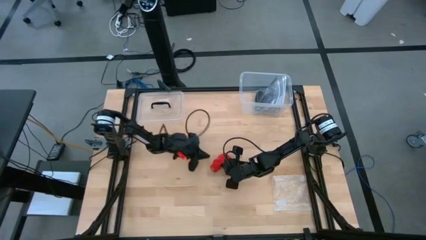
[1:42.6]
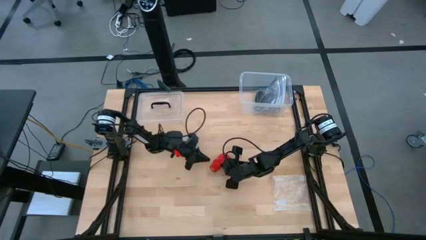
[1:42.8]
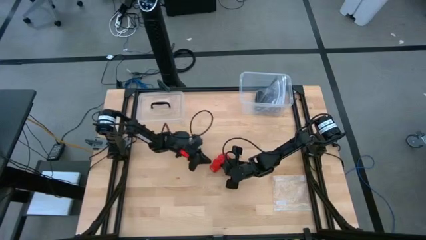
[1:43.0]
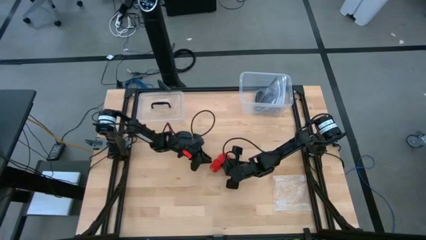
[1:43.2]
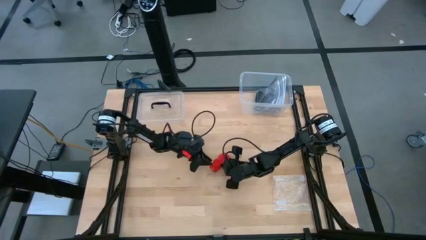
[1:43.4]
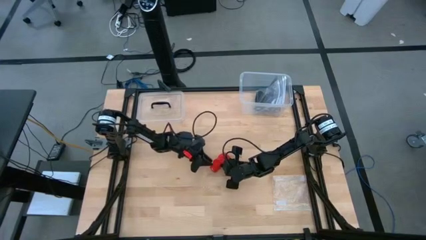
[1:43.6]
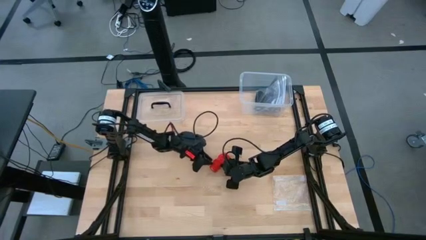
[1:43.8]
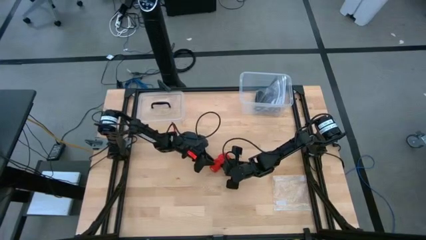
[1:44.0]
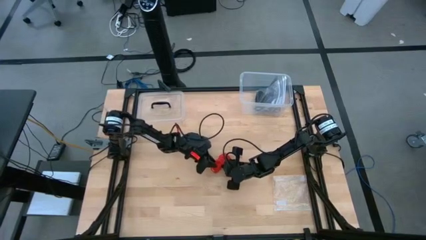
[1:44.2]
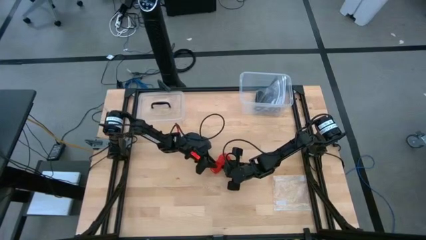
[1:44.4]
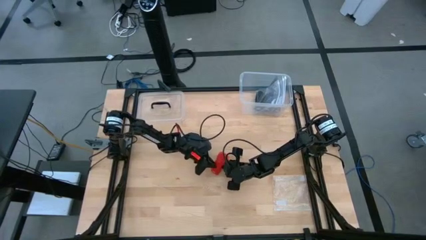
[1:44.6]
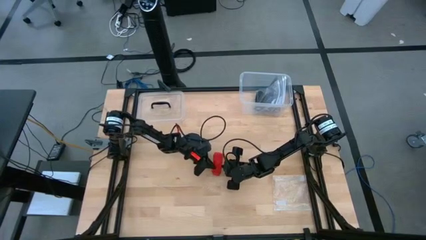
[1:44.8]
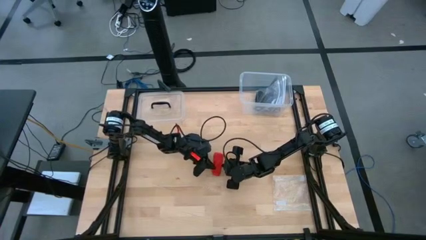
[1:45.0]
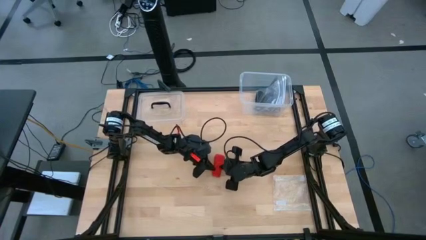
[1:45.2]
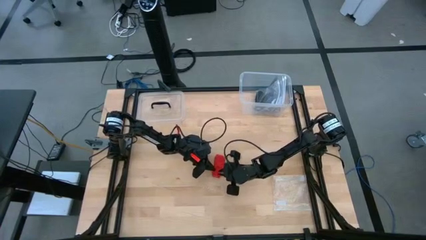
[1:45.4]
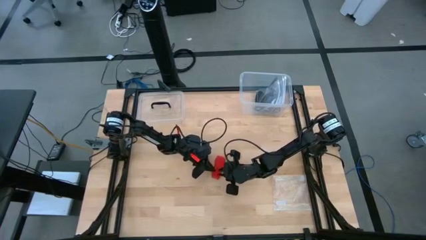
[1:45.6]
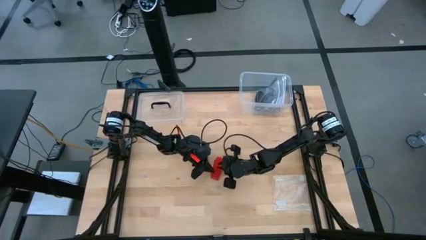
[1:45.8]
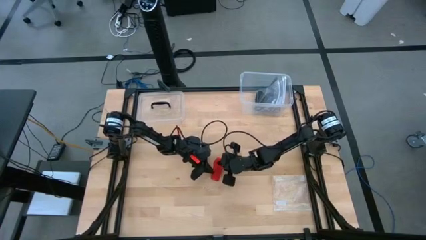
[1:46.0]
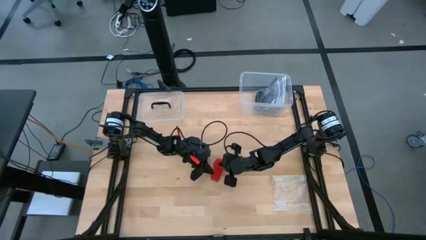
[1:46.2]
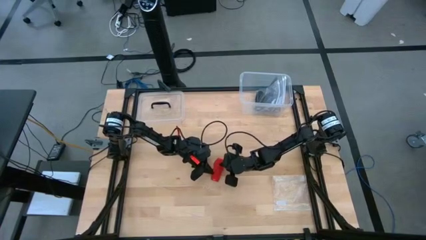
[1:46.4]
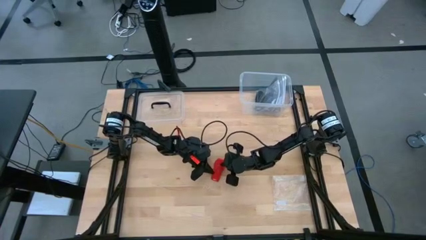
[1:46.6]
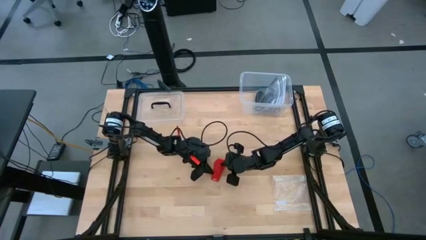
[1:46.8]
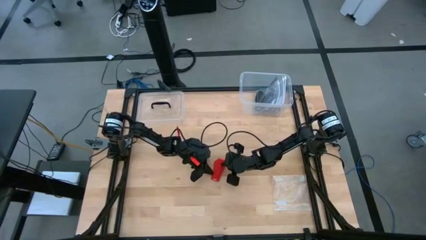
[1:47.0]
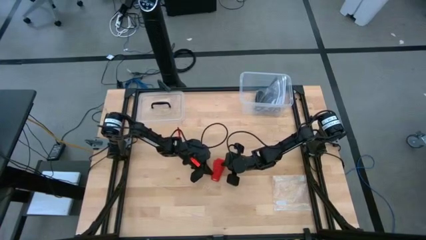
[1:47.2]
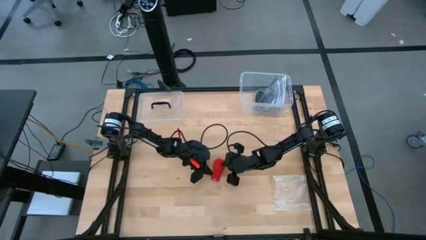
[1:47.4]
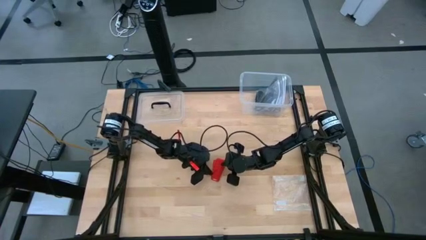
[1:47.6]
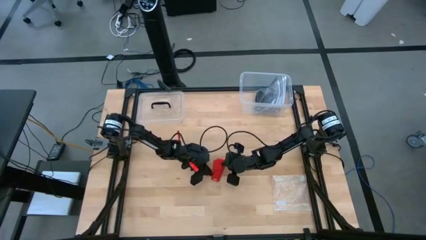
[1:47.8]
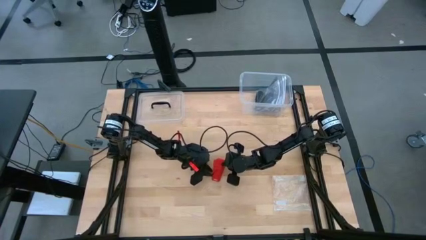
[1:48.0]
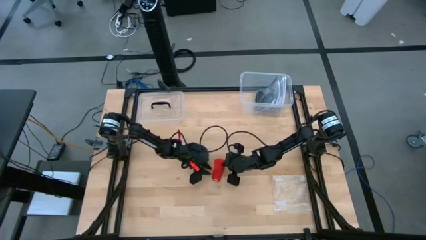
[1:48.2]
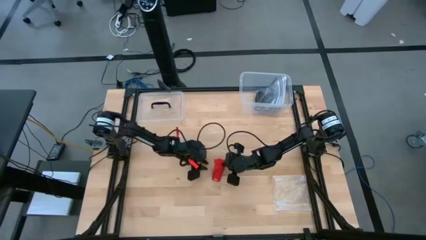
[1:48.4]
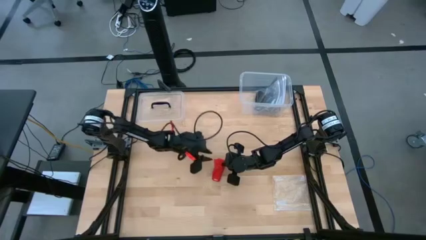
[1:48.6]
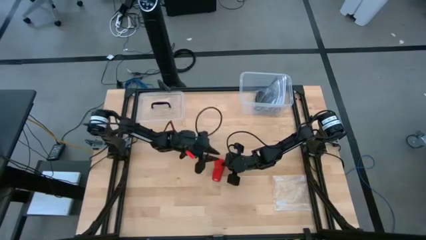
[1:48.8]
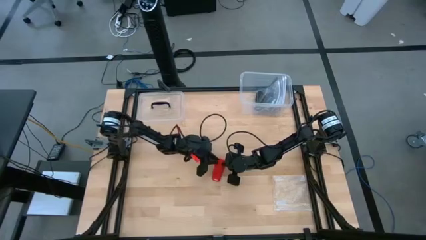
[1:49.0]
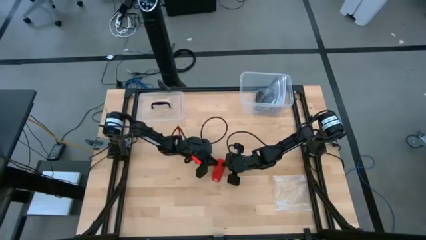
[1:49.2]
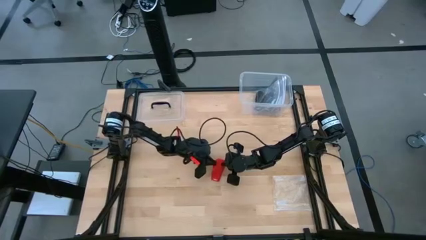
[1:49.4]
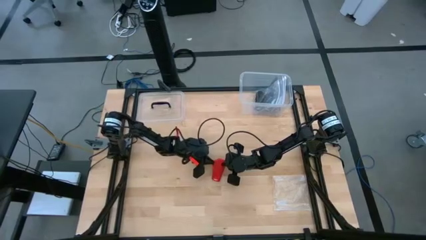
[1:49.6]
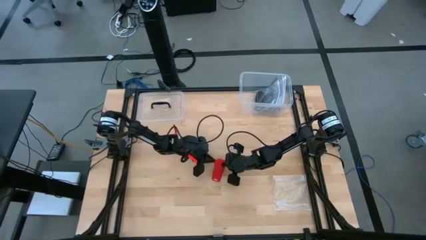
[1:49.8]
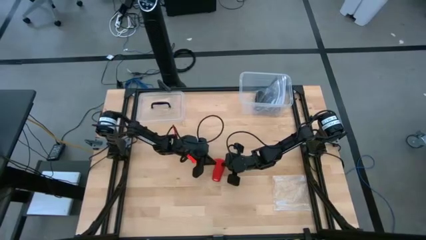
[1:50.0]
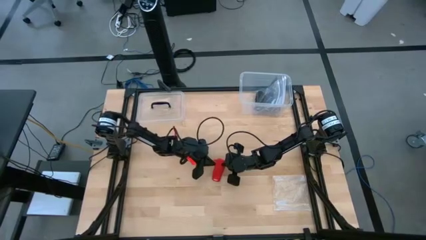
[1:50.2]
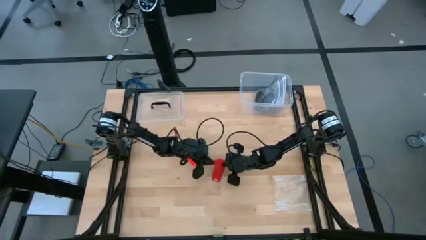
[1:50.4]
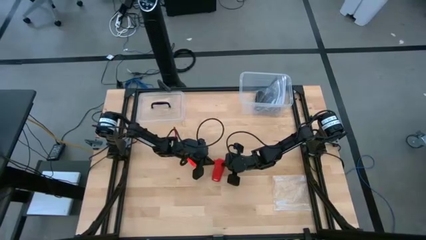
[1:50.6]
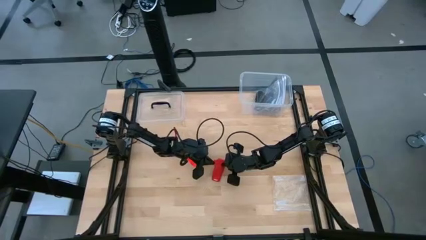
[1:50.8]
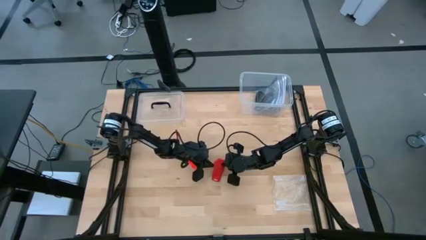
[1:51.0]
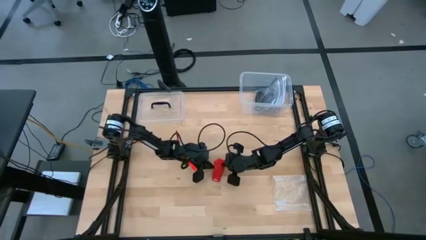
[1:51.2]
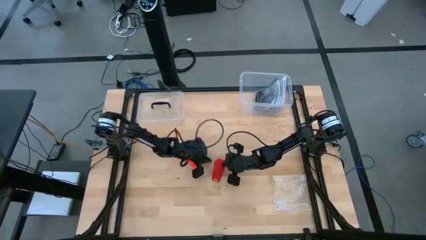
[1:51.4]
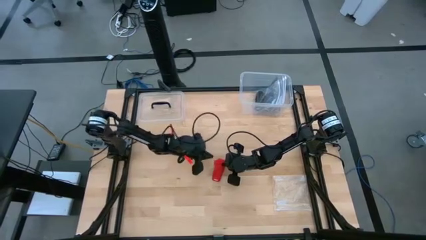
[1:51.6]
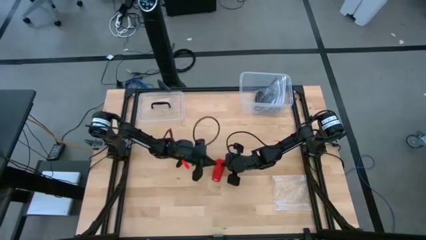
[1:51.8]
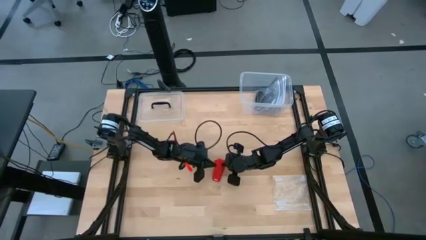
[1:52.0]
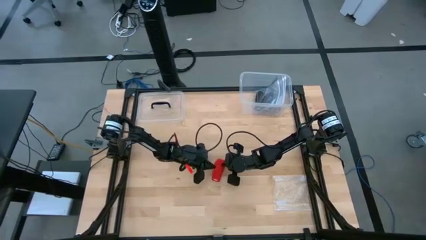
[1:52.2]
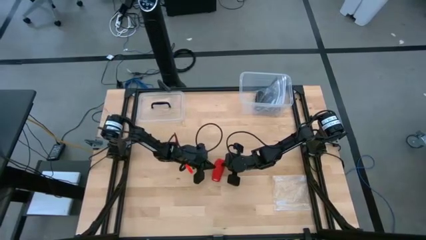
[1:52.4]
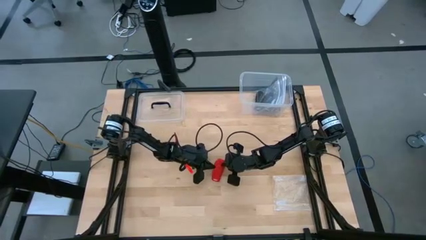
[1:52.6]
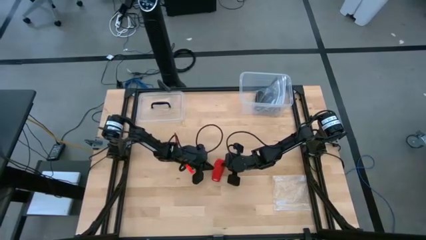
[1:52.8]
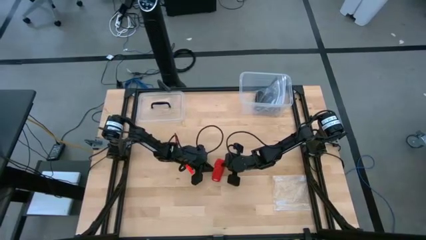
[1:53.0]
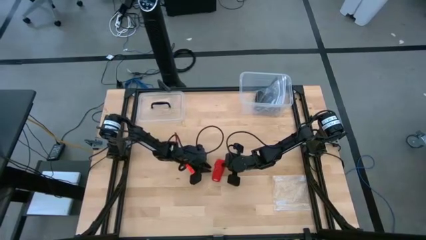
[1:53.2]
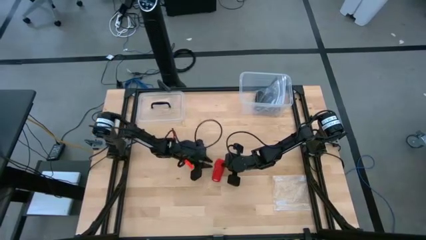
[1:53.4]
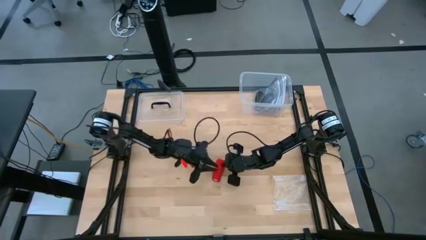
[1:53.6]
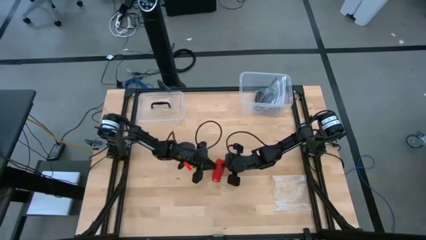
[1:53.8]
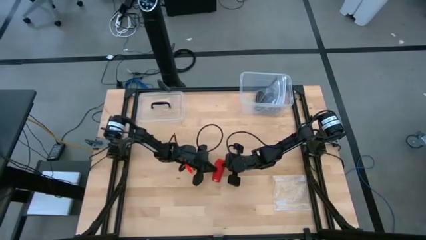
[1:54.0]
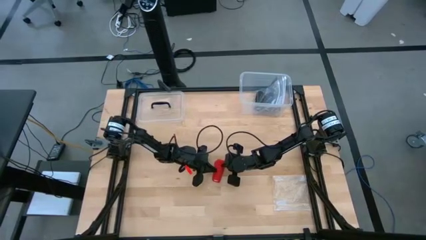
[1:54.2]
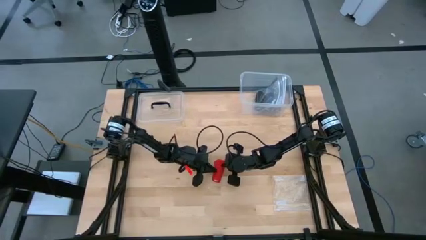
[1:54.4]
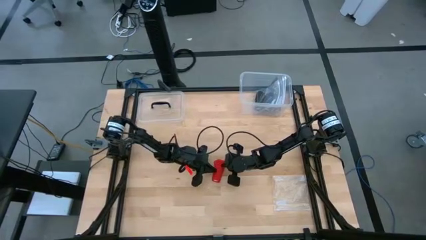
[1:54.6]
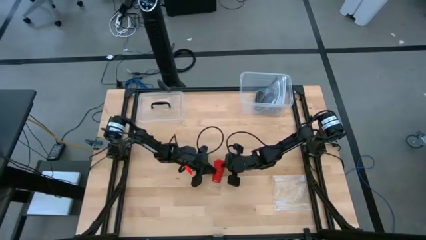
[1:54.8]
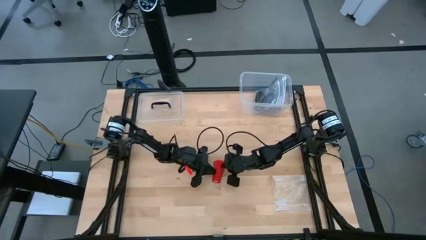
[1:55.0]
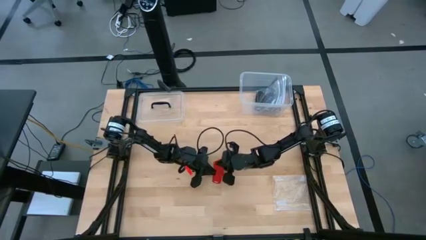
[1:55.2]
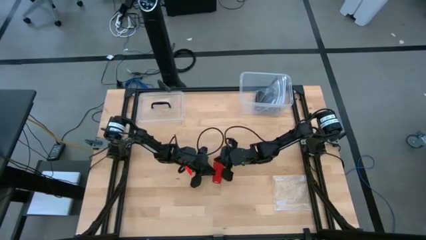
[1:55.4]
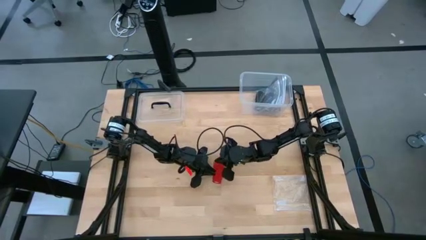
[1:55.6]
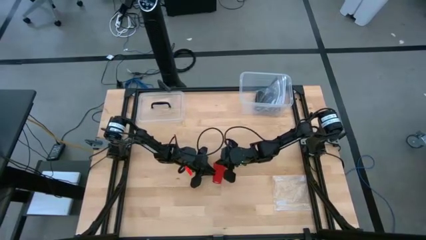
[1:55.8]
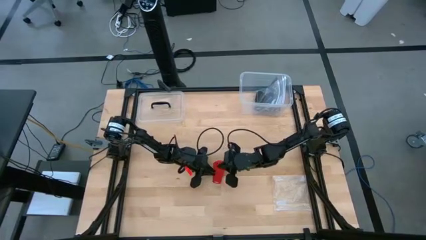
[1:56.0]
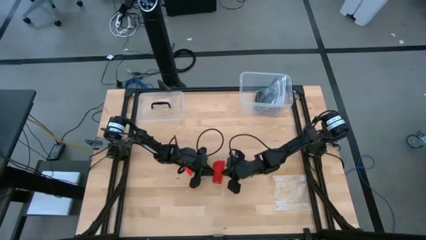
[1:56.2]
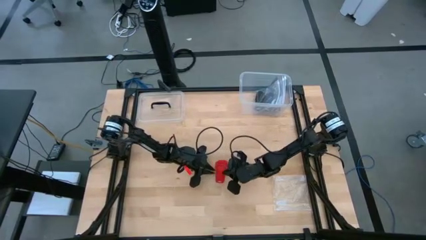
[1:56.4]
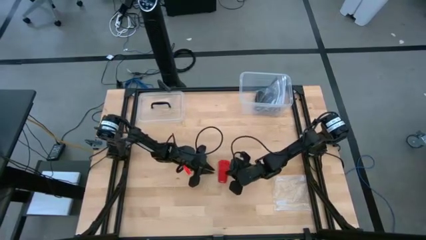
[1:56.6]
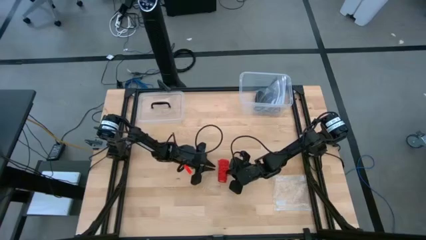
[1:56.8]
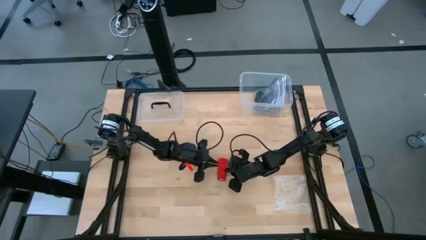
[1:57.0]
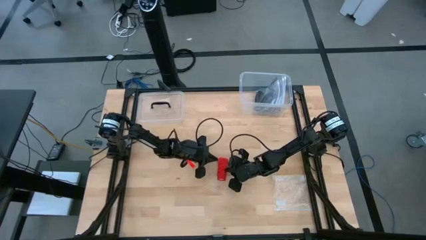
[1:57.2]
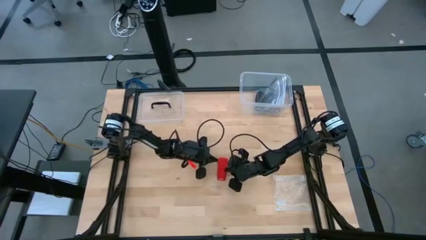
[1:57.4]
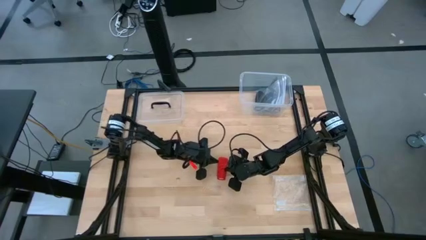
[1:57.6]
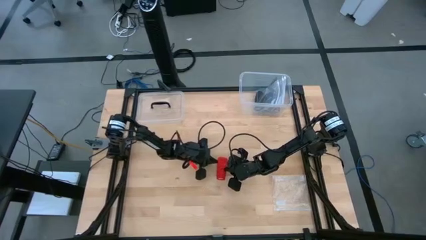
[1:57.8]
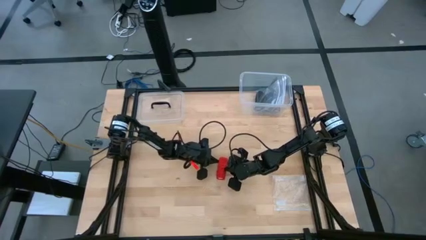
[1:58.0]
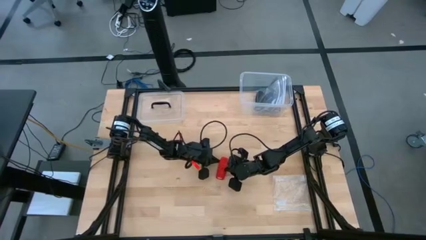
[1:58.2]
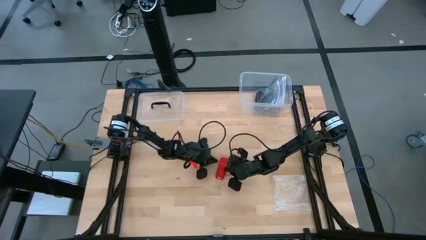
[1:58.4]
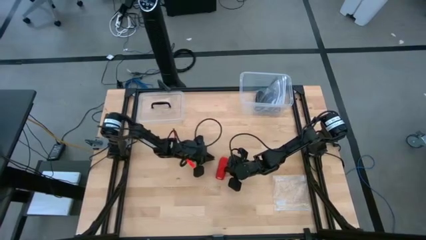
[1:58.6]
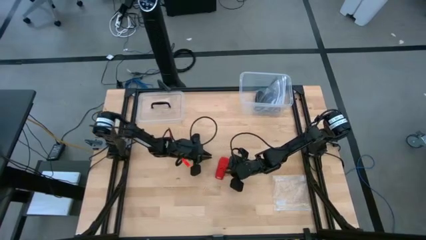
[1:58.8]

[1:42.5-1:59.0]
Task: Roll bandage
Roll the red bandage
